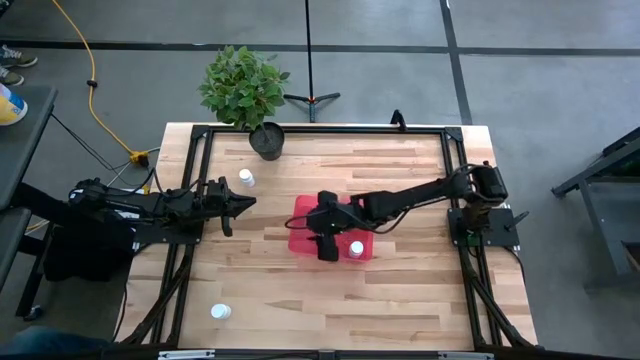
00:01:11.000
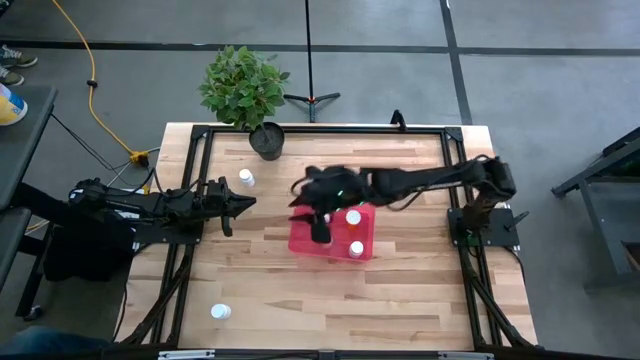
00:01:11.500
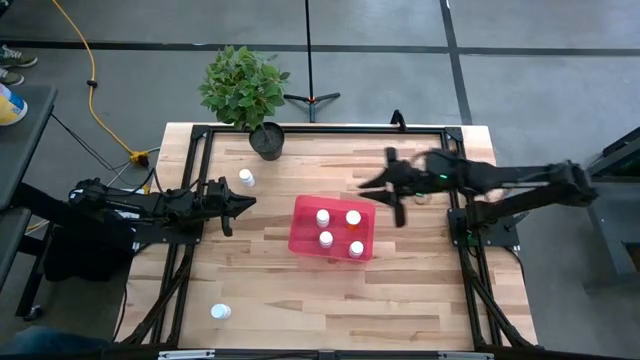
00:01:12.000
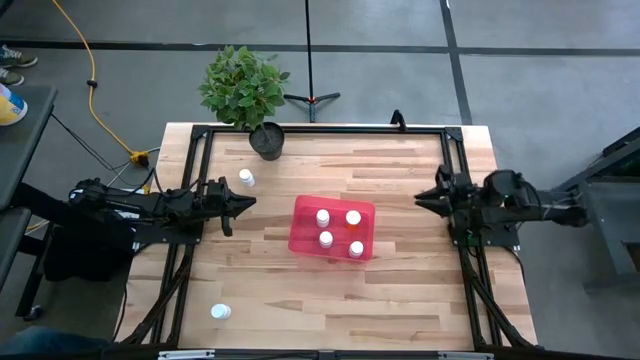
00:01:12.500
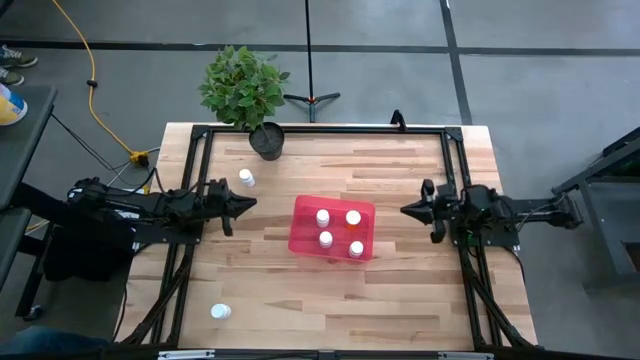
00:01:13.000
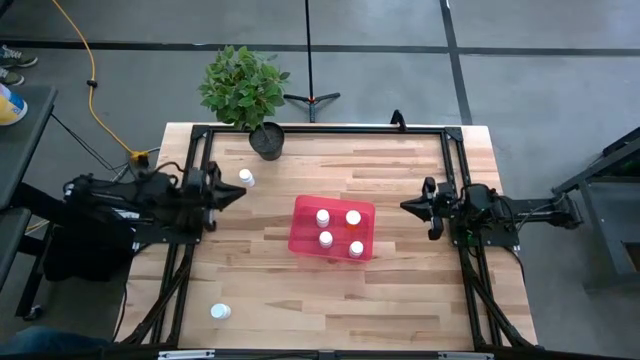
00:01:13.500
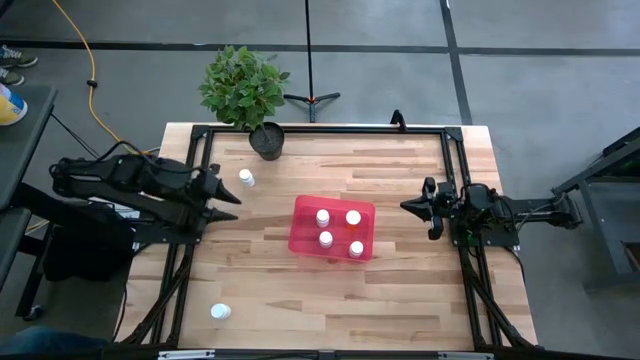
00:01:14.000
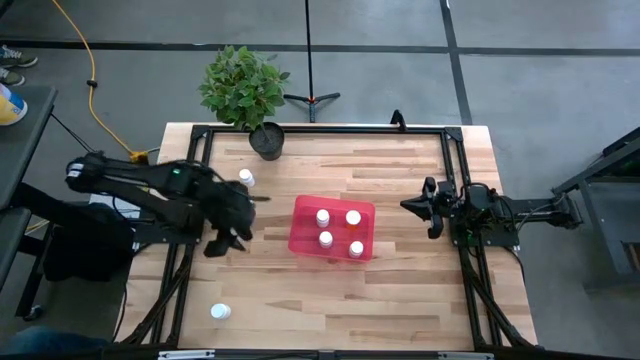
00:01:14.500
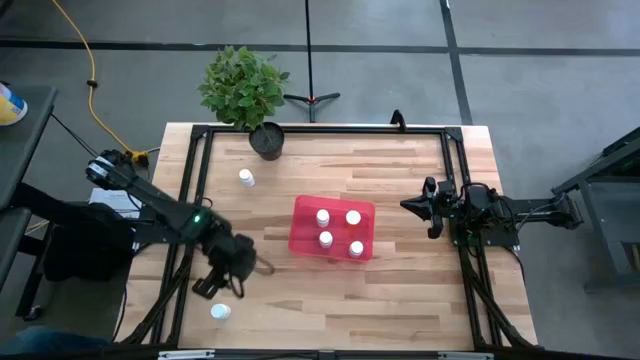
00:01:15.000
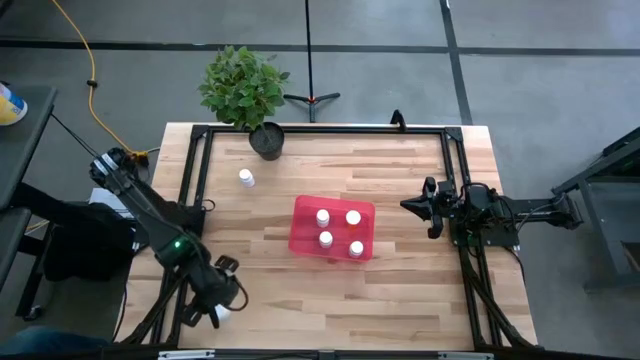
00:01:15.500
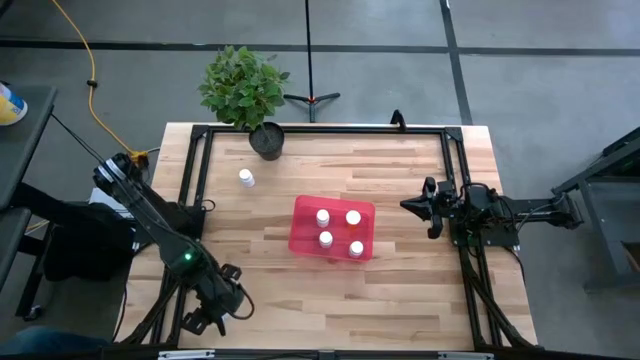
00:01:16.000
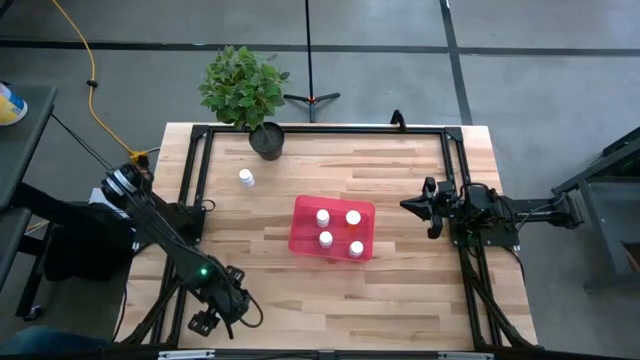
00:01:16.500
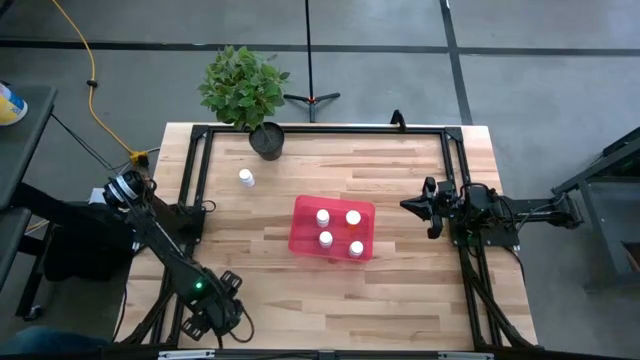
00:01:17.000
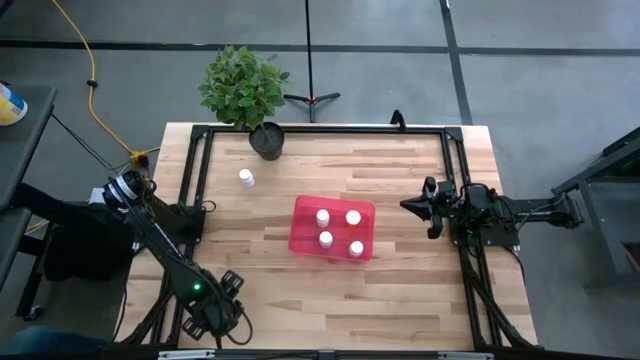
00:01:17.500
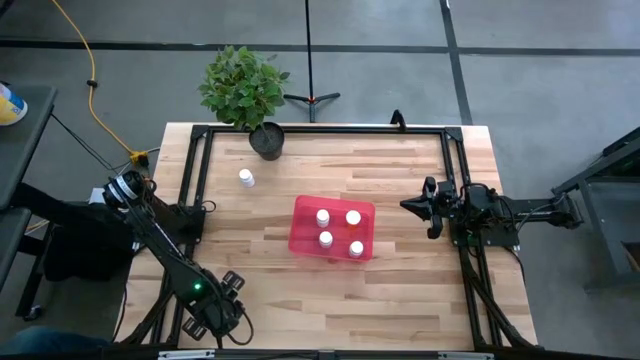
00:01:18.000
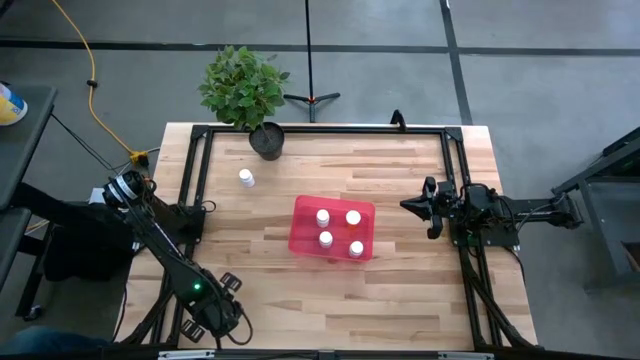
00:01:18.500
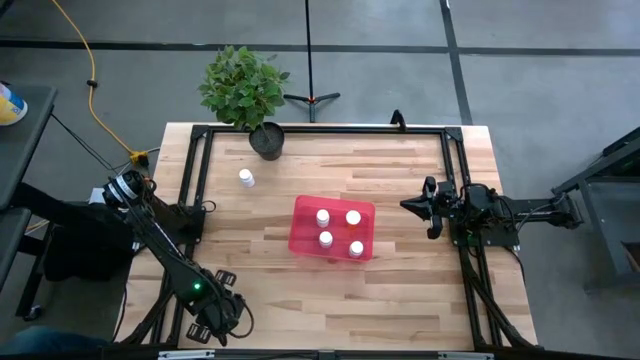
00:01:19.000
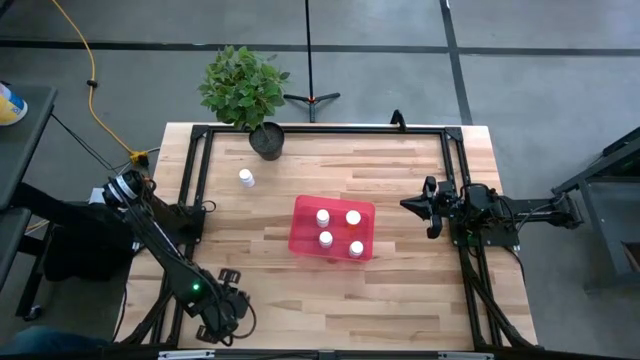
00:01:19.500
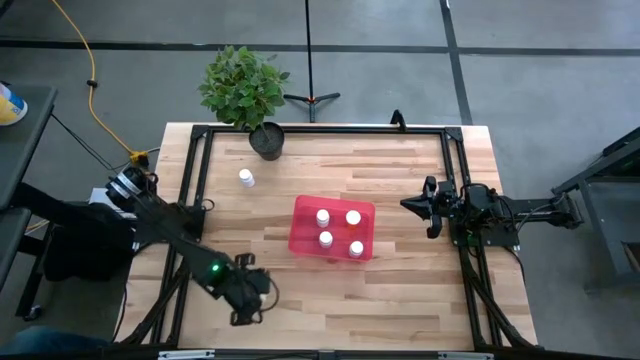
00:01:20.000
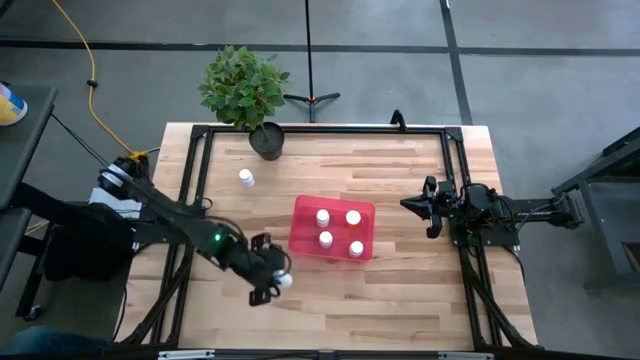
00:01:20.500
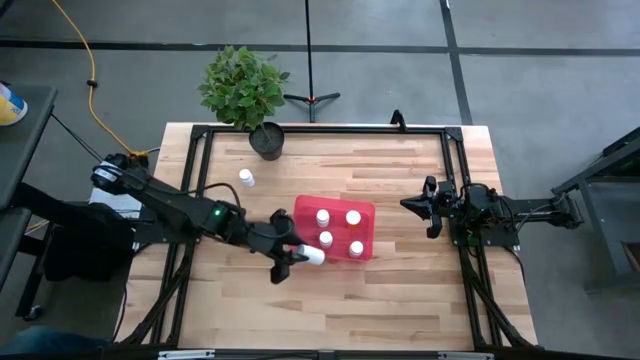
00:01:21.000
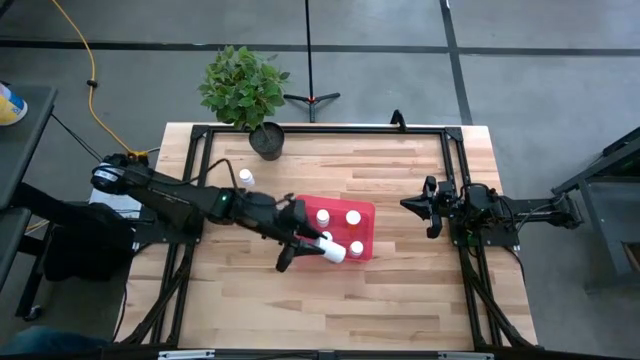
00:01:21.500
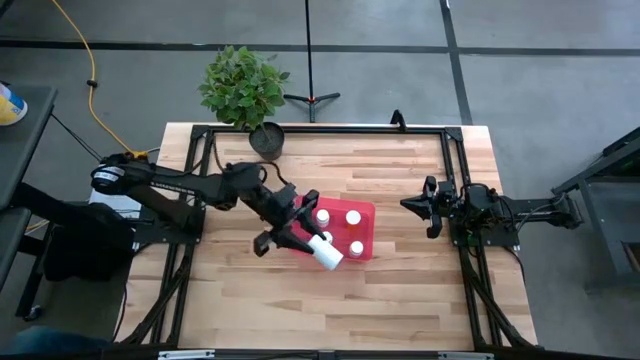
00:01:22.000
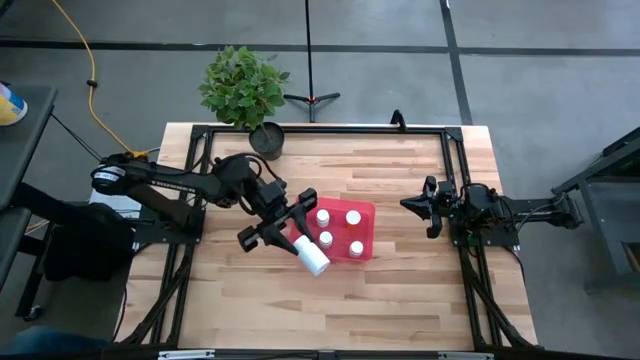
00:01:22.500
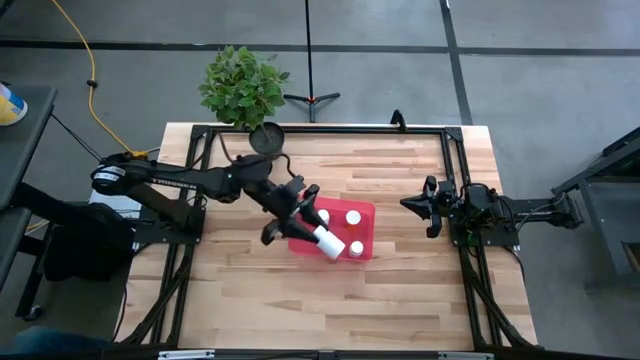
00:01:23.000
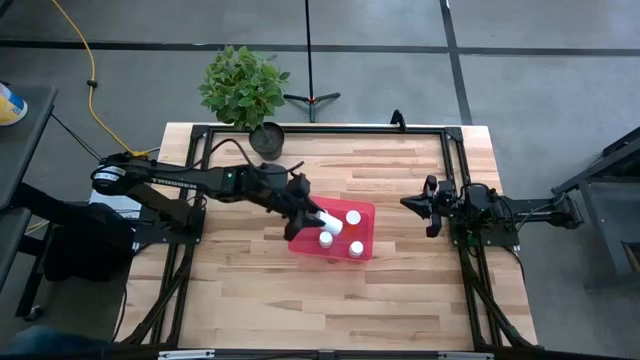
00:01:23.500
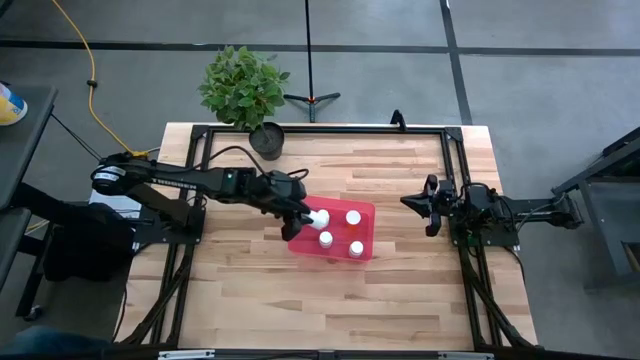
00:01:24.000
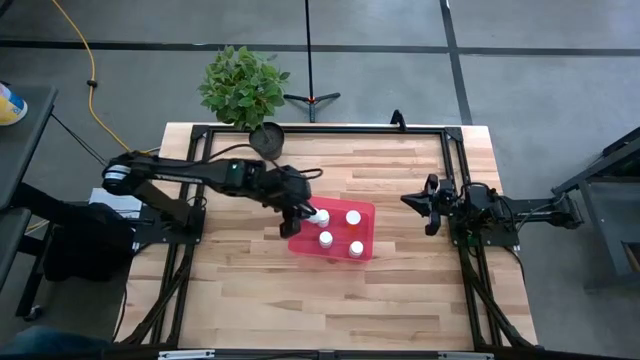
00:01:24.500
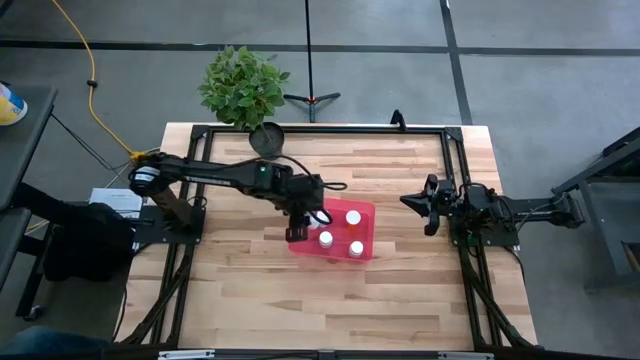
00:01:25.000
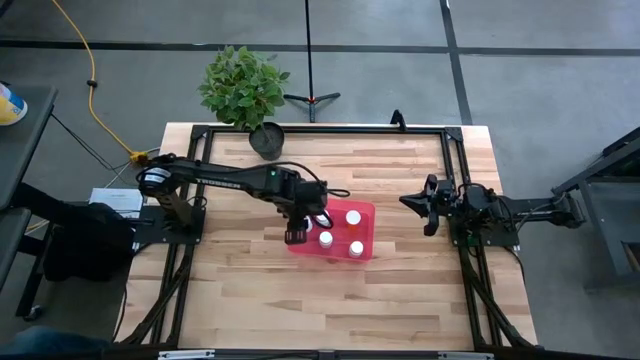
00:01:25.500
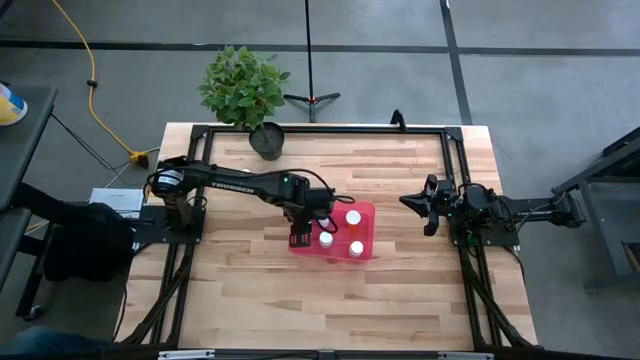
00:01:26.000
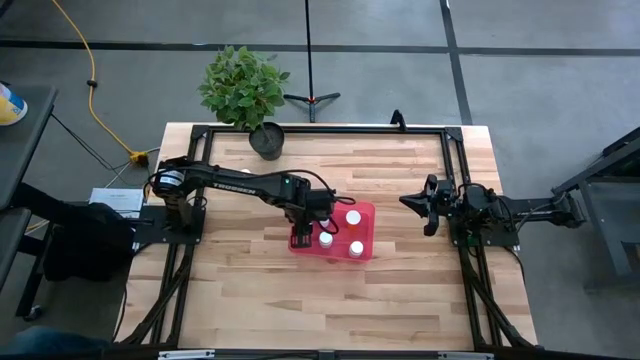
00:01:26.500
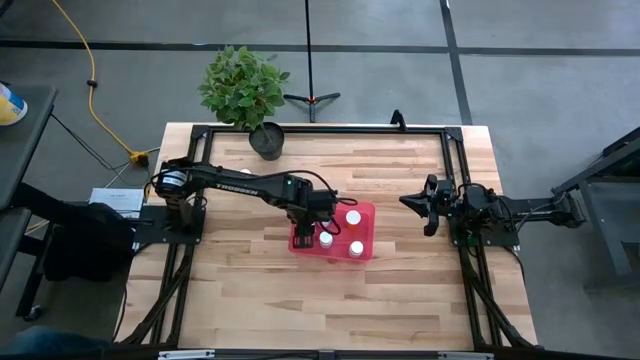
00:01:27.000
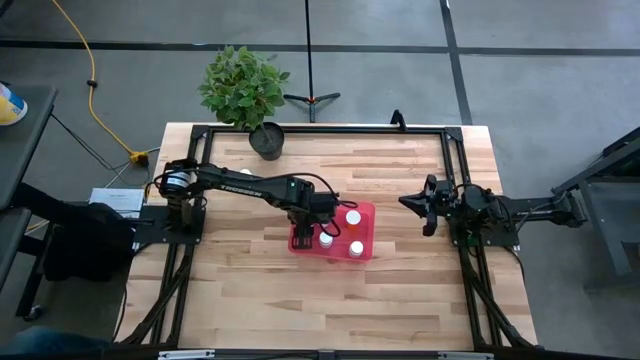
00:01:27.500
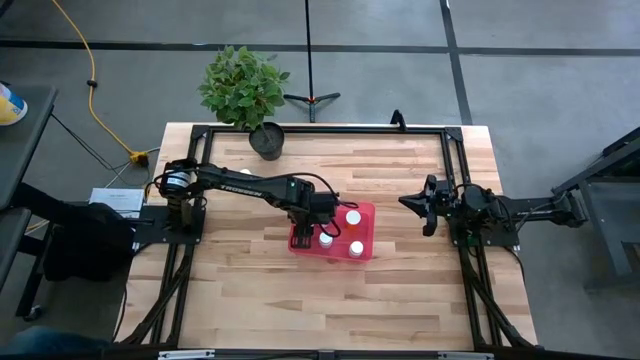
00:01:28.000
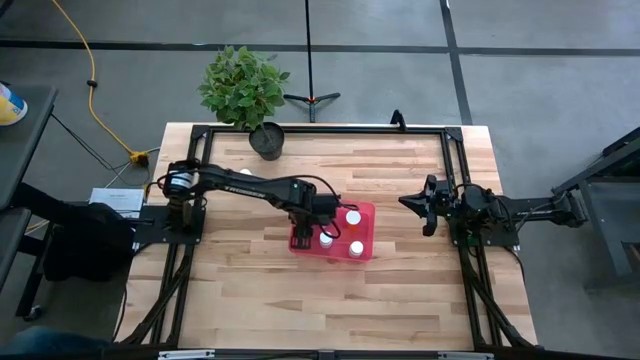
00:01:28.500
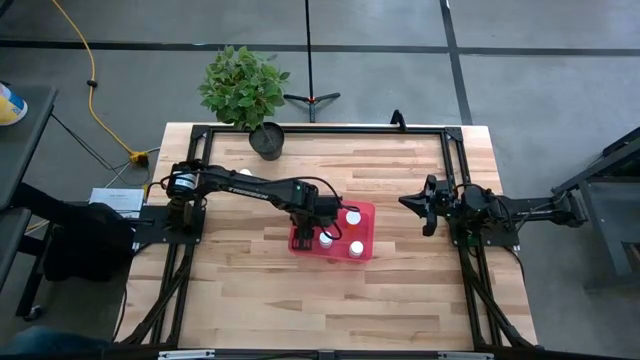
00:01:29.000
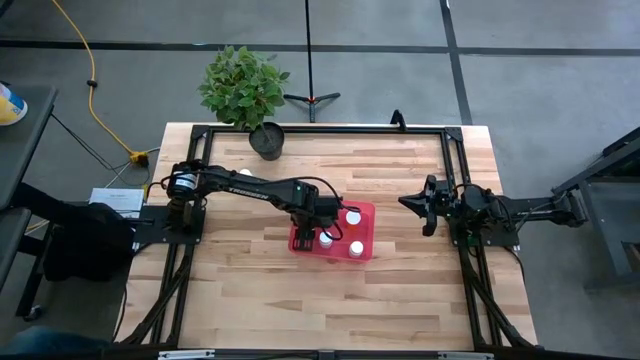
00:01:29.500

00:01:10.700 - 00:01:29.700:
Task: Pick and place pill bottles into a basket
Put the bottom white medicine bottle into the bin

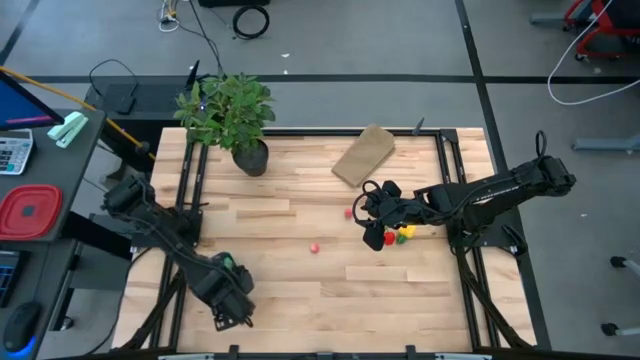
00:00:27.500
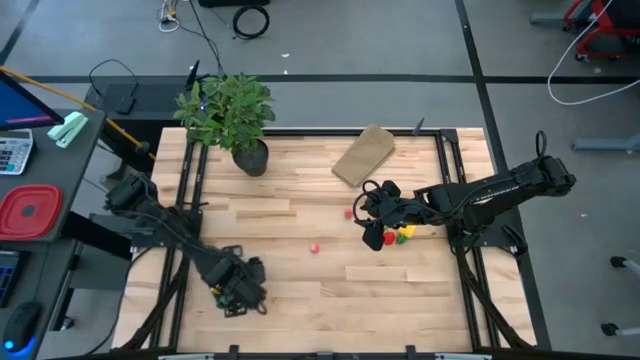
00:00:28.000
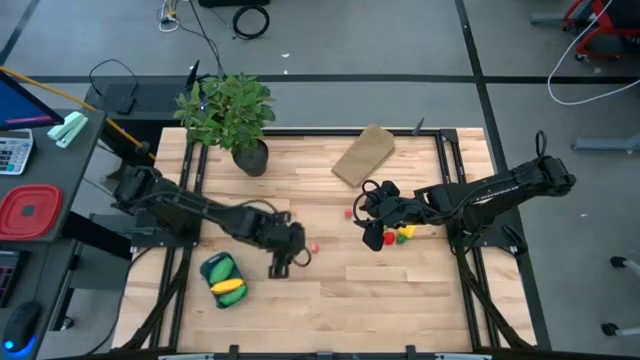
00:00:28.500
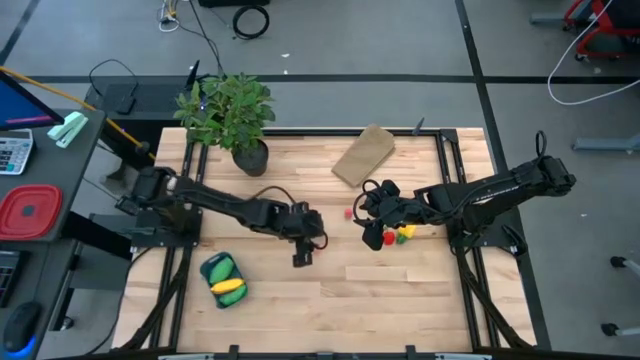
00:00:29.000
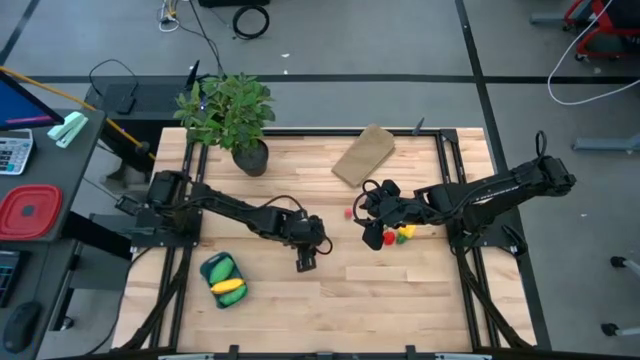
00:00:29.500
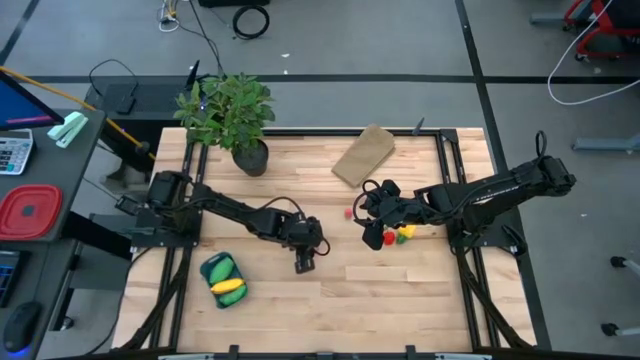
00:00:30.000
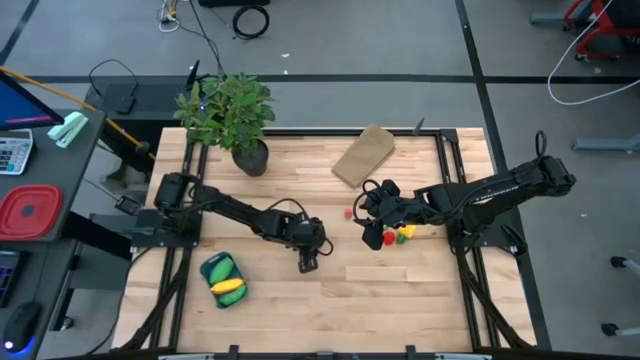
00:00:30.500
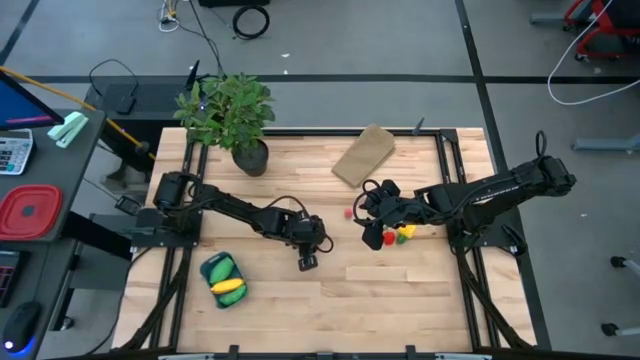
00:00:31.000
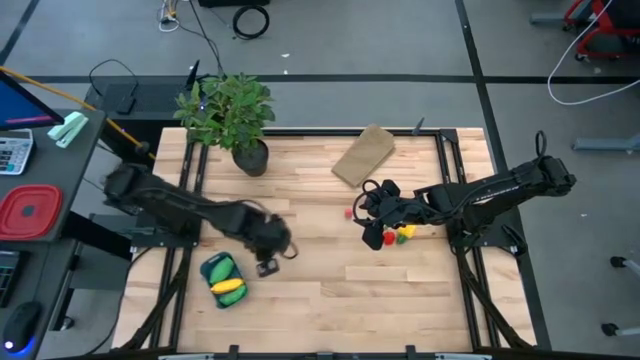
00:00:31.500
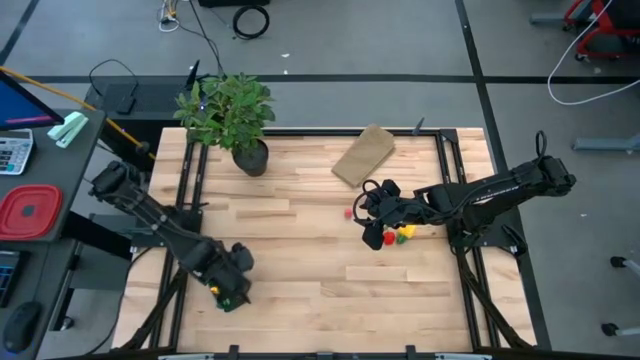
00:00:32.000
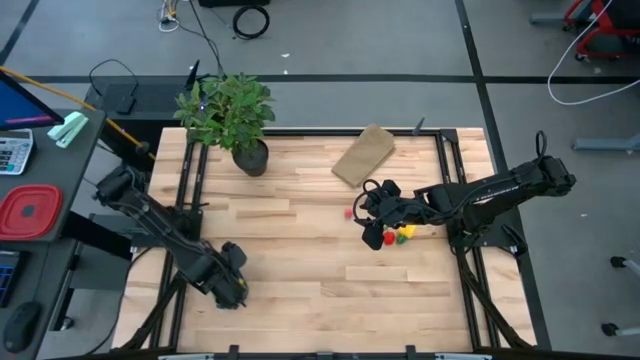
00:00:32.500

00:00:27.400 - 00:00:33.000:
Task: Pick and placing Produce into tupperware
Put the bottom pink peach into the blue bin
